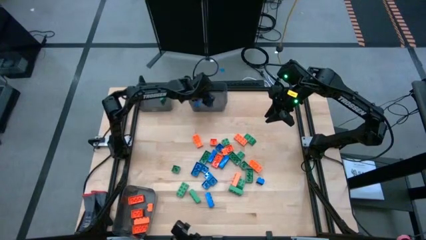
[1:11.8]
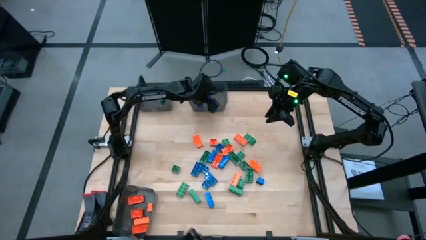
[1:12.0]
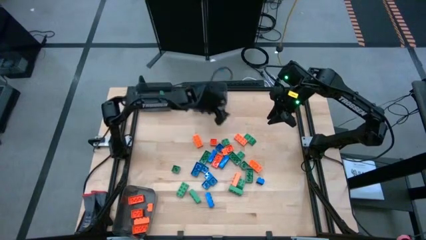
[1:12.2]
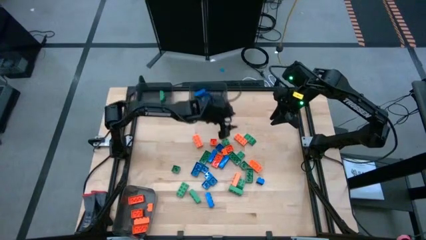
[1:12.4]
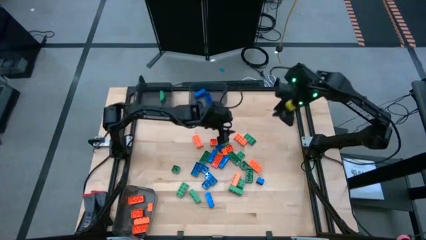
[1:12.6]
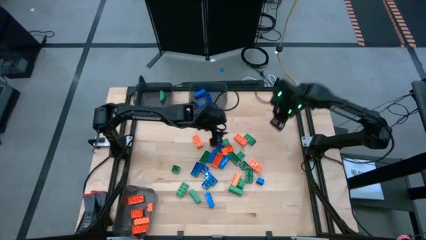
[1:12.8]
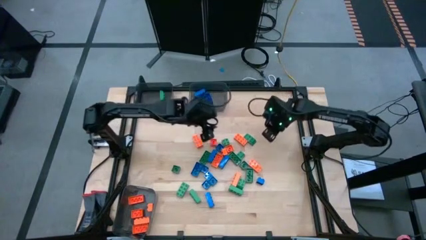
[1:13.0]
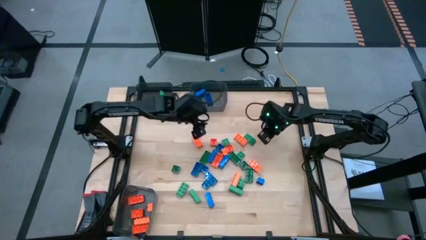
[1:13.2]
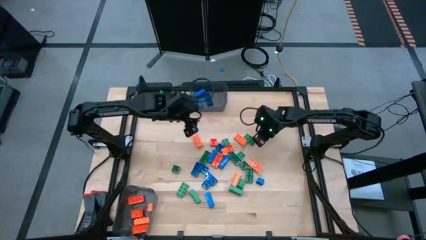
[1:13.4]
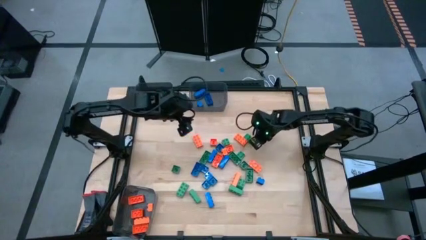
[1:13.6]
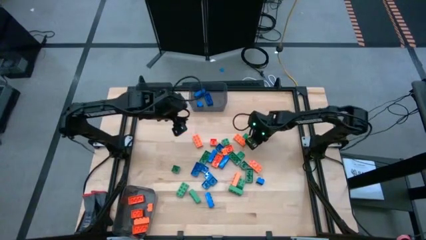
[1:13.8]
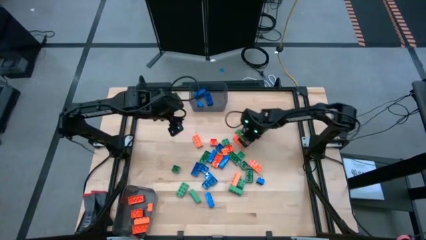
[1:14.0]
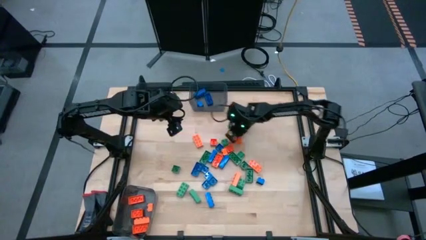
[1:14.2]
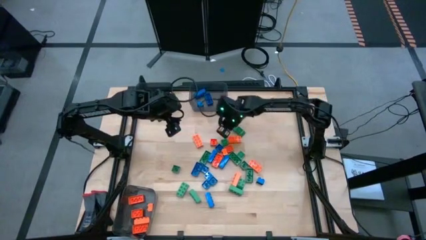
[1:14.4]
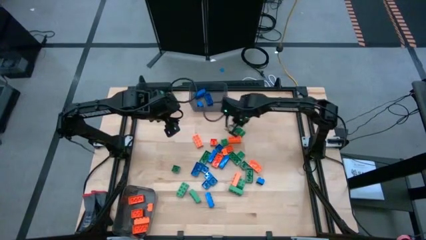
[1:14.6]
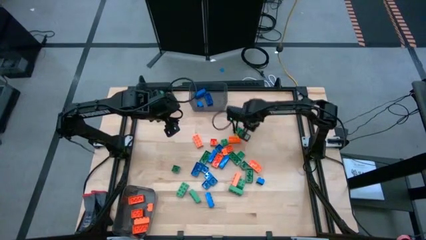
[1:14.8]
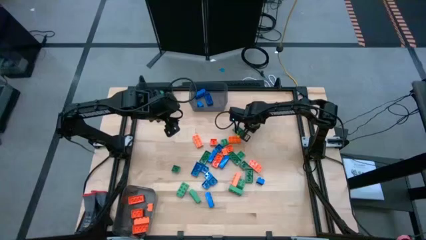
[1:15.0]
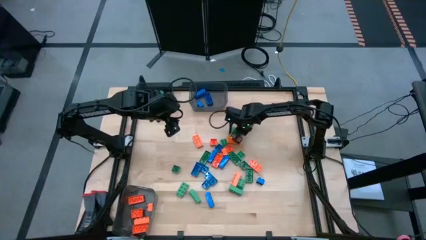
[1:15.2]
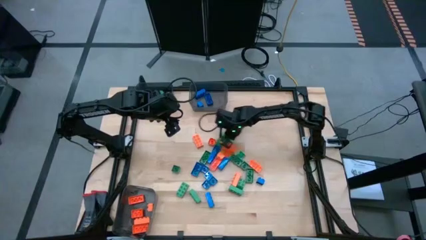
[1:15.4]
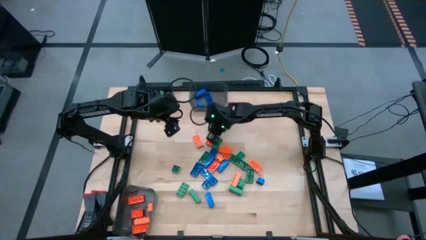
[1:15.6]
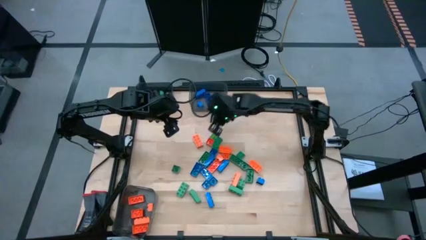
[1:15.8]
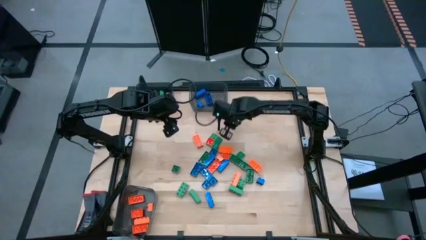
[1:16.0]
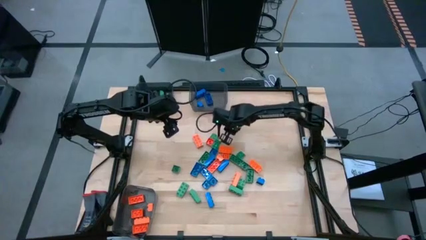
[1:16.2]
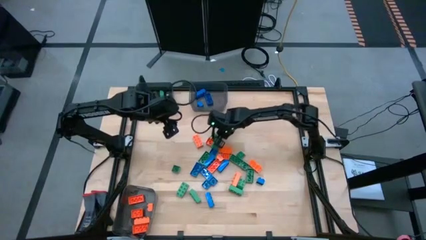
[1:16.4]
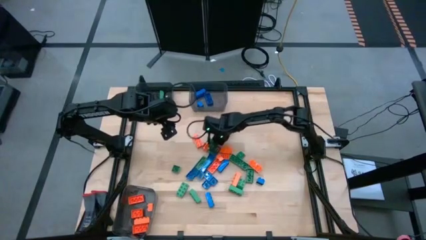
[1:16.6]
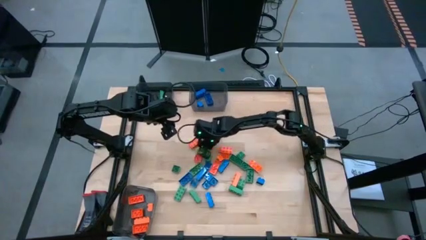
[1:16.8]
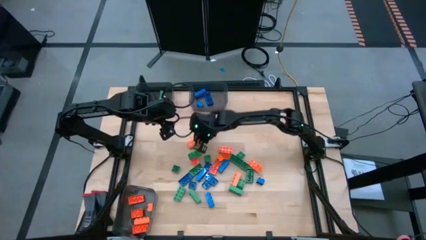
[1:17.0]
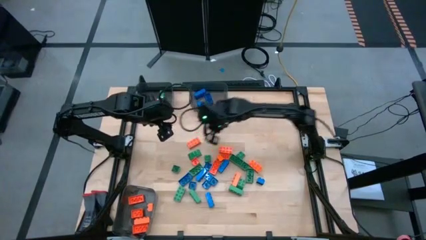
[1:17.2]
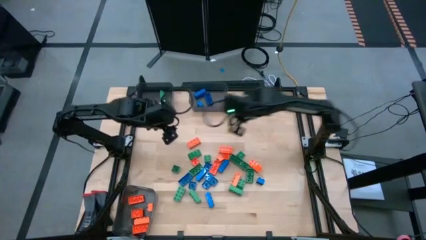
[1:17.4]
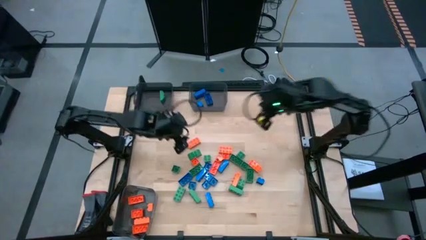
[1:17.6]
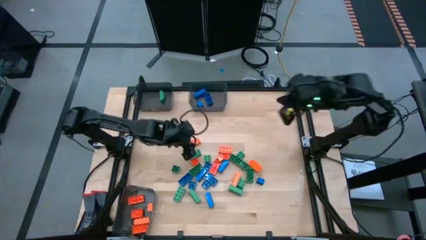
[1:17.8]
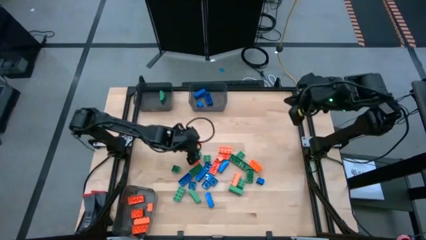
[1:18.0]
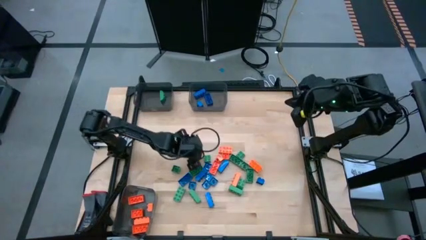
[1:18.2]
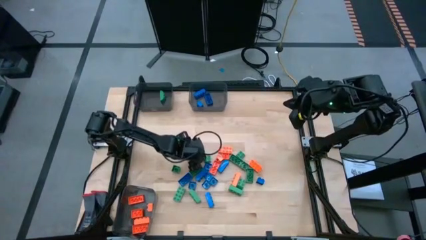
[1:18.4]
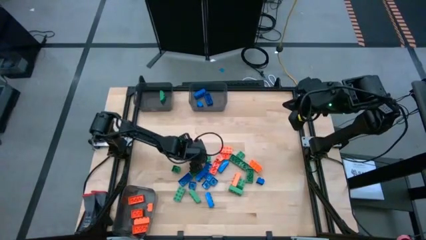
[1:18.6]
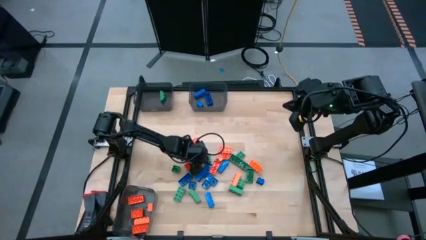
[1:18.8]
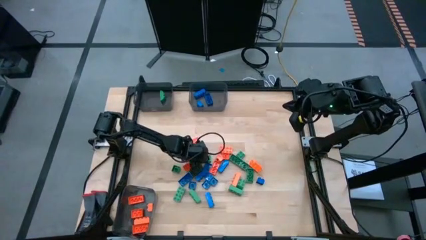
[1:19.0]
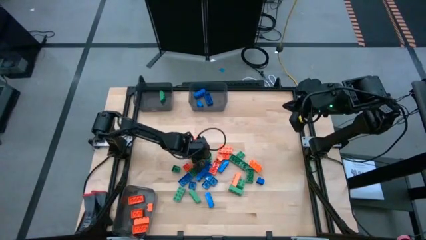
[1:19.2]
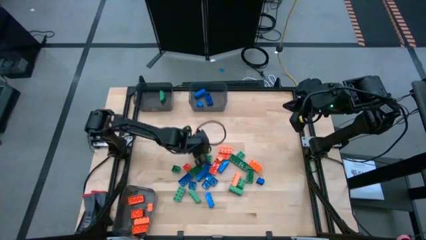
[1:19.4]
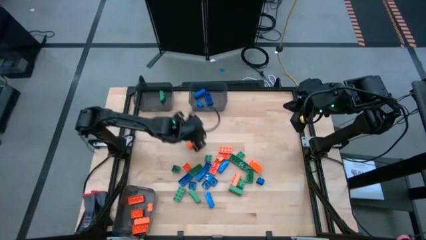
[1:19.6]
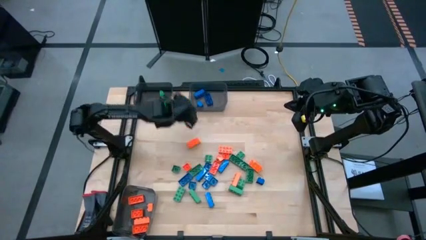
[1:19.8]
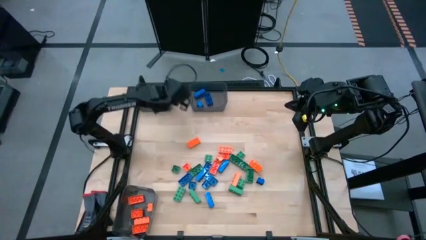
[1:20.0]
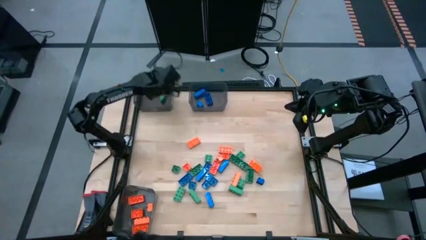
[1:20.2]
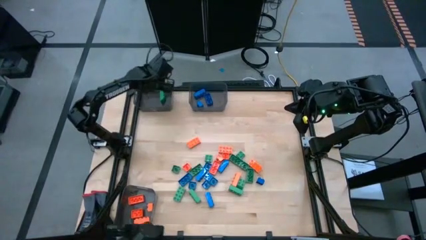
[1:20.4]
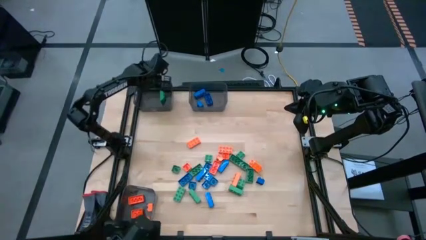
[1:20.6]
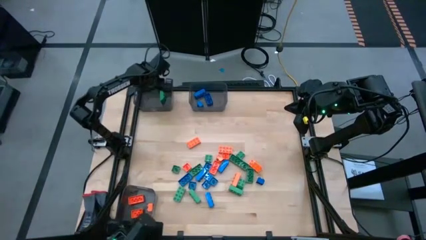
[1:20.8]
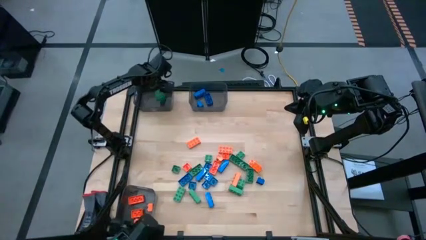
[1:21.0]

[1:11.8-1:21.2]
Task: Sort blocks
Put the green gamepiece into the top left black bin

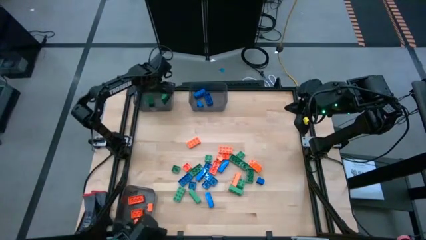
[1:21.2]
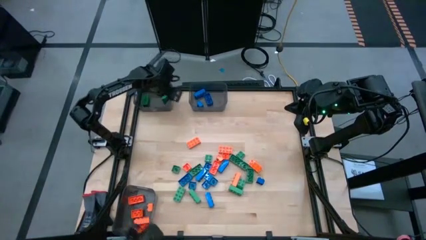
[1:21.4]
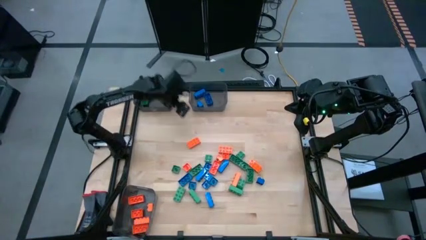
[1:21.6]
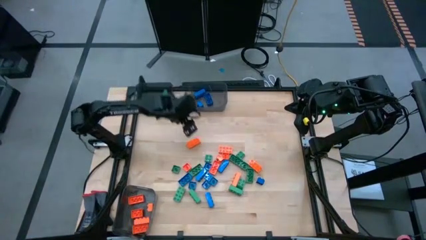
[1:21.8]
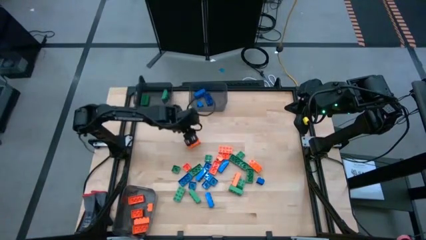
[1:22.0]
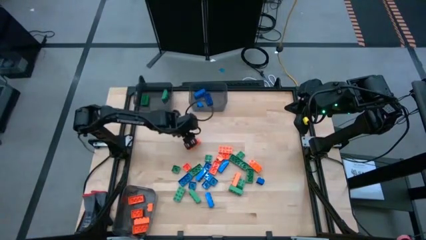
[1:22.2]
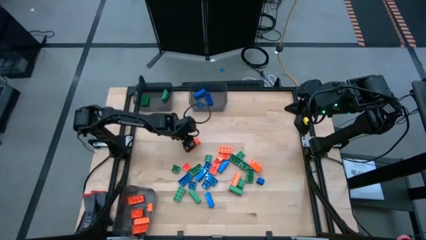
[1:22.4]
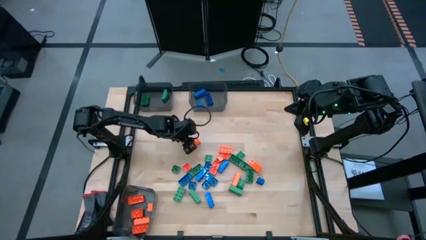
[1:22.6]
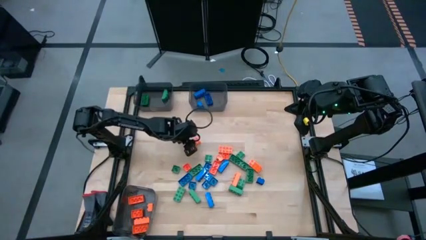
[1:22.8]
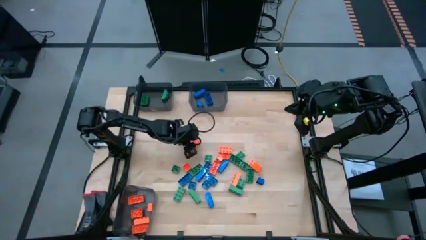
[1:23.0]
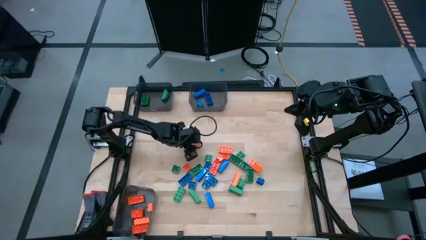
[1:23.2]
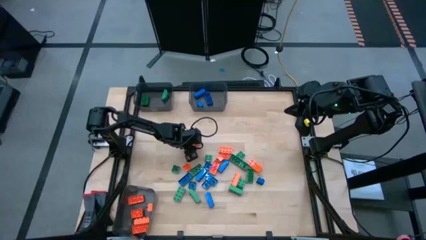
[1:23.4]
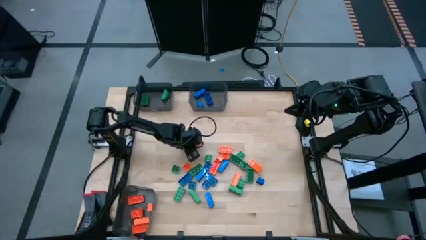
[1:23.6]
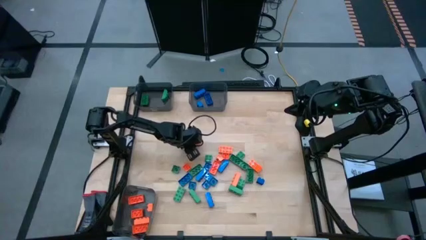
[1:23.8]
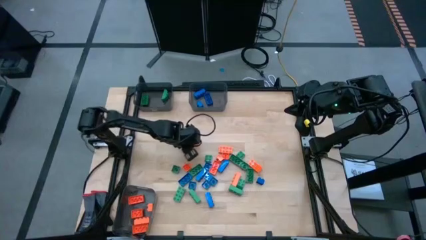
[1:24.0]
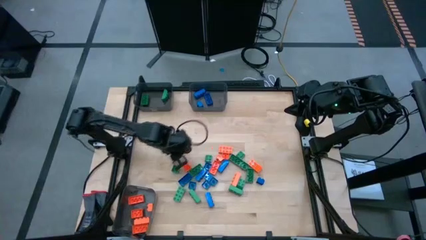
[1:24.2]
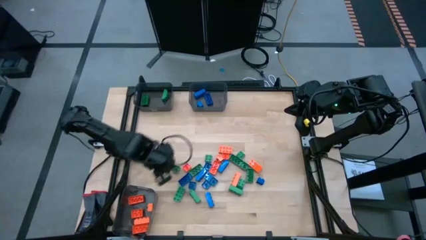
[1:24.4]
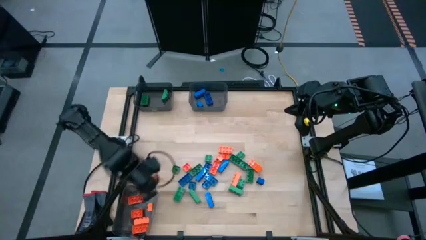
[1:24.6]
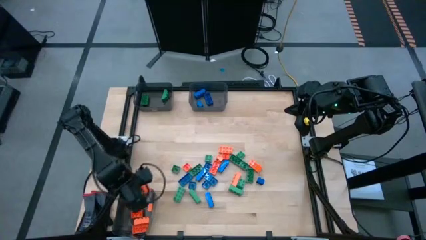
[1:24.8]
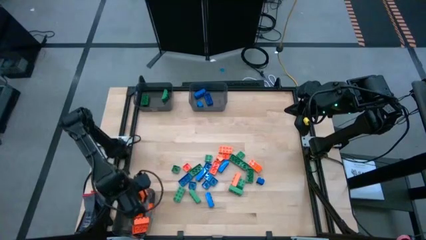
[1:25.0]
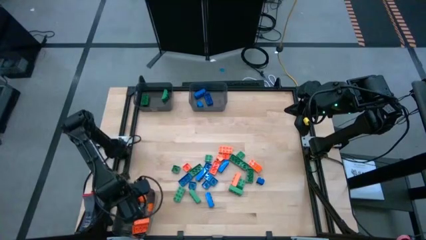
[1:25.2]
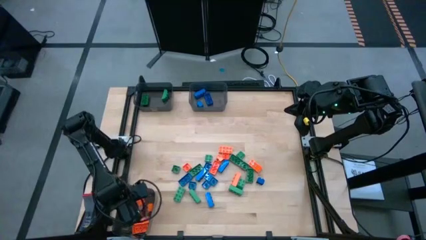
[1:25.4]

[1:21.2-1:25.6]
Put the orange gamepiece into the bottom black bin

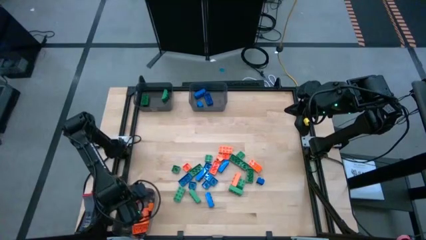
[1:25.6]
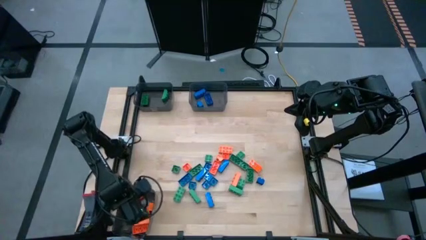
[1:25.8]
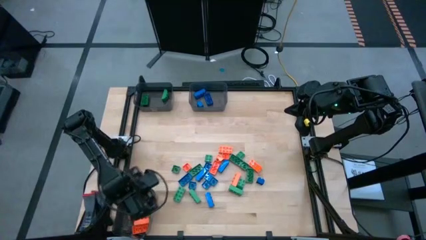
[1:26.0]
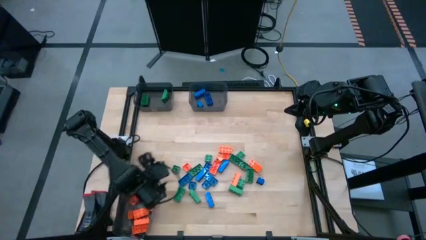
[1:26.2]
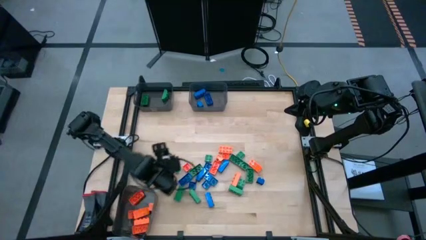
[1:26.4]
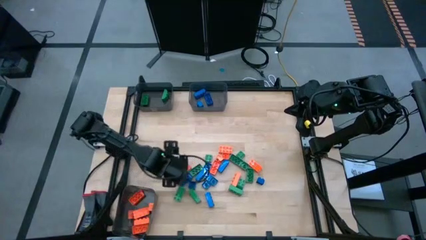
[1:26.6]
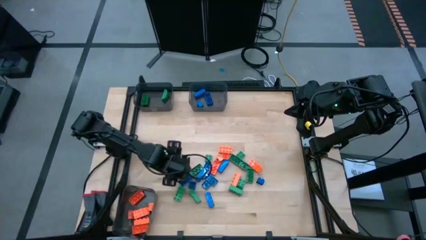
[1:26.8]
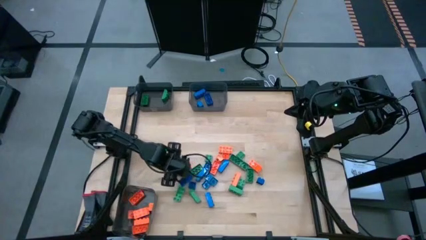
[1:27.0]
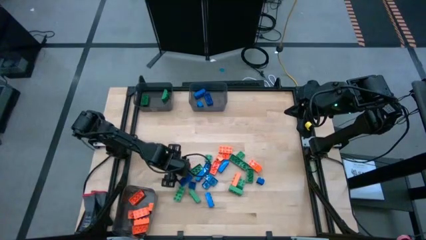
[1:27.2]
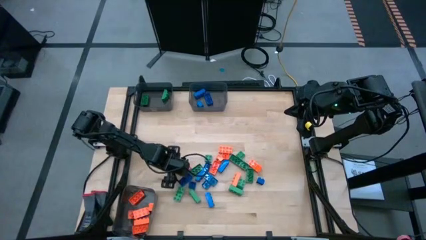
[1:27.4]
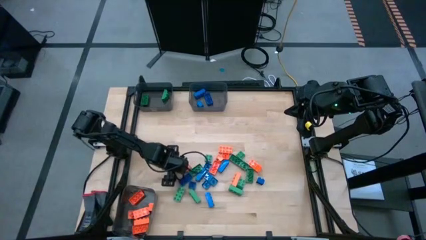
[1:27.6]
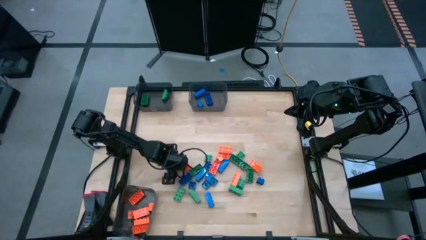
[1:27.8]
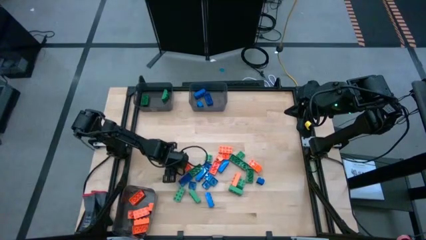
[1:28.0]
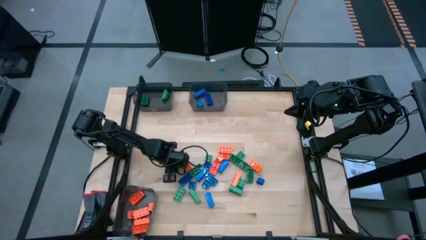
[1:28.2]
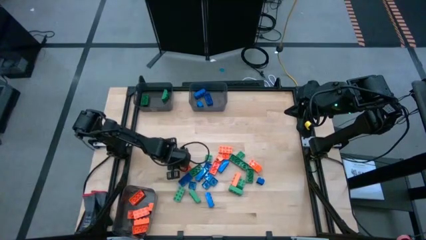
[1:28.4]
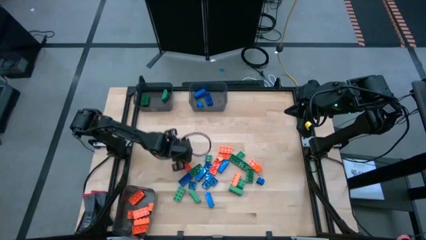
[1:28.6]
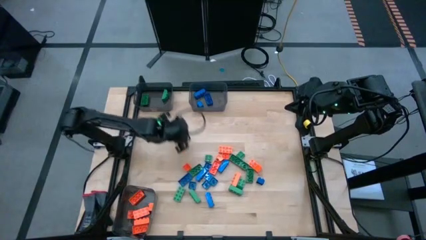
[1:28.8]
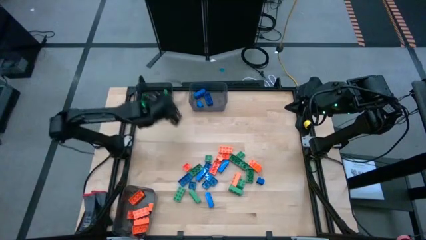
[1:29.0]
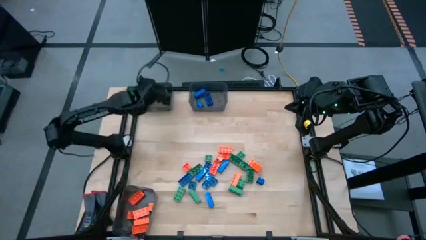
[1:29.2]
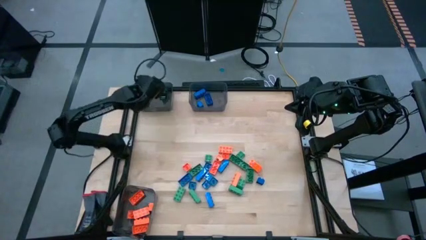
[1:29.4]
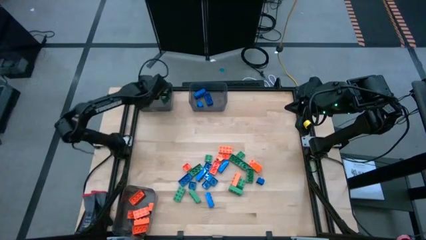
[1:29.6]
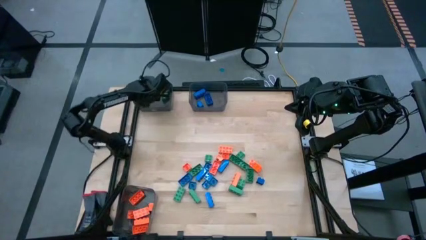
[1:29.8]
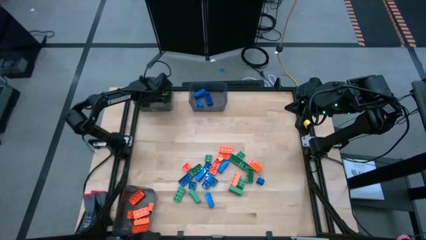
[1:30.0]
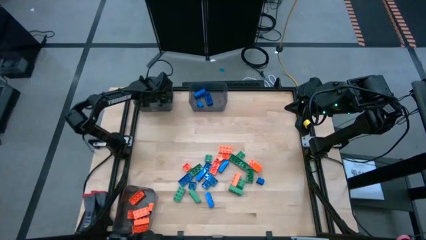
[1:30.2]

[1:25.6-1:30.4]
Put the green gamepiece into the top left black bin
